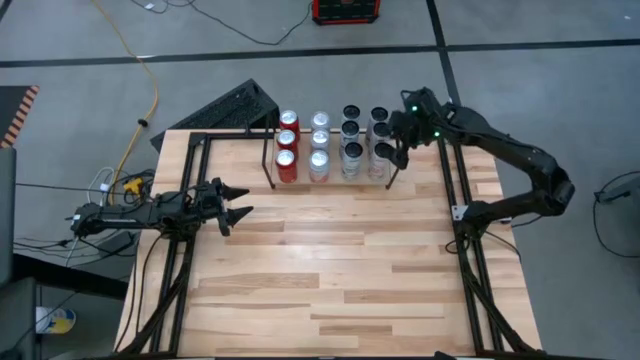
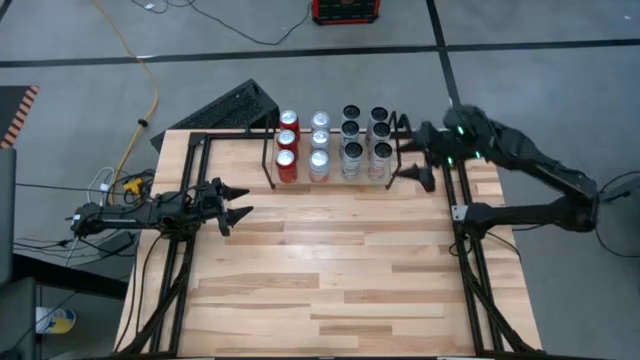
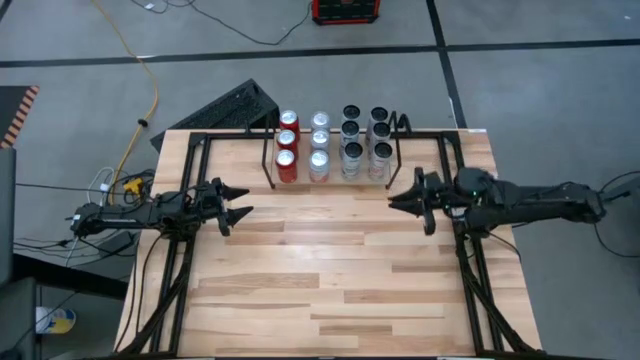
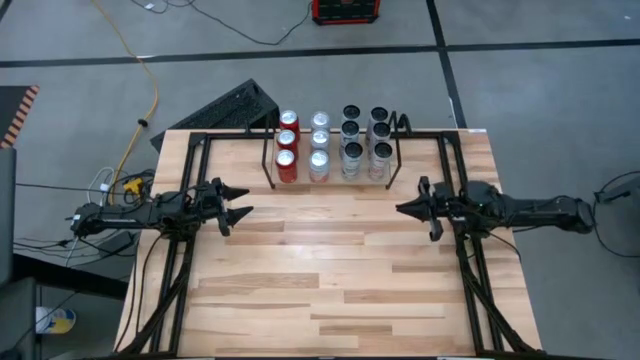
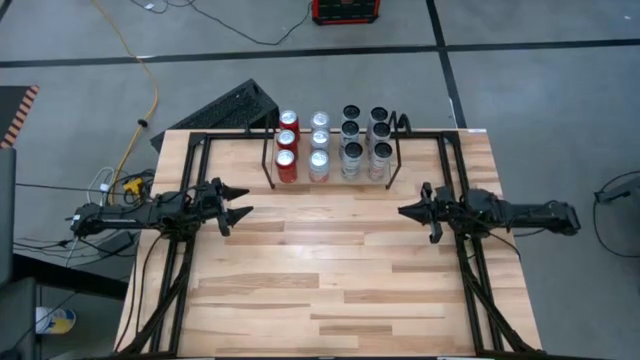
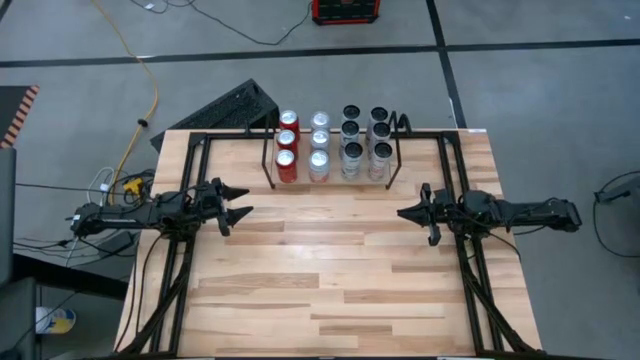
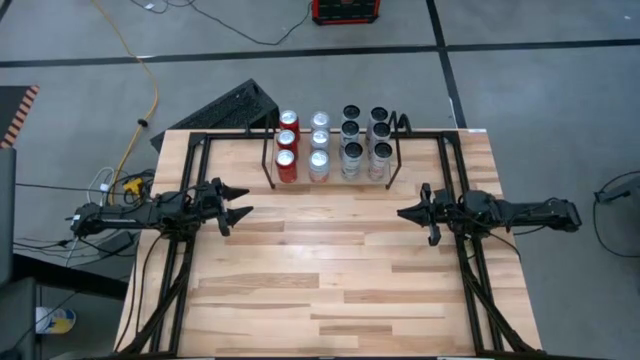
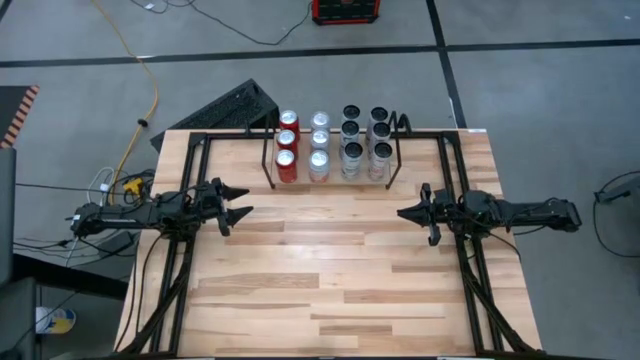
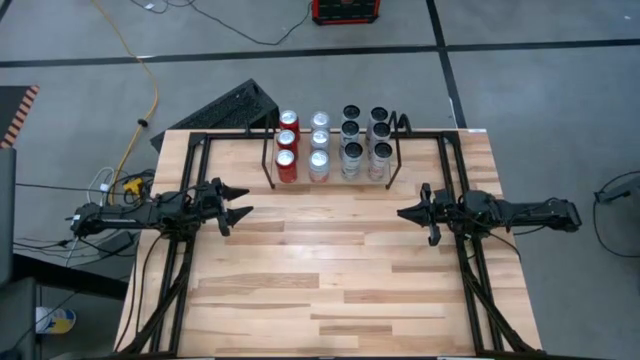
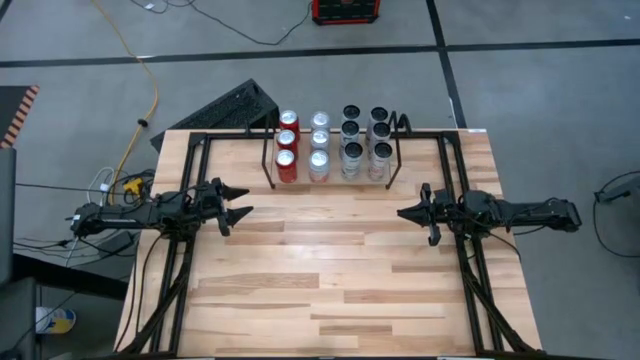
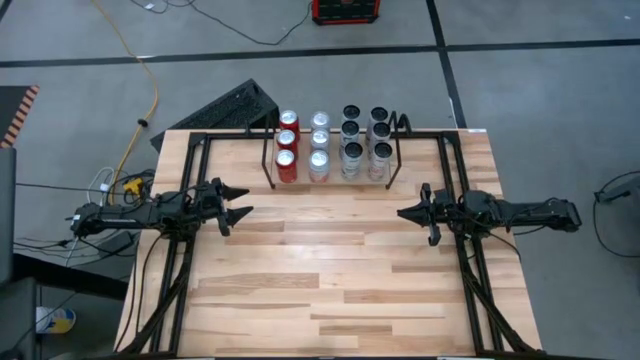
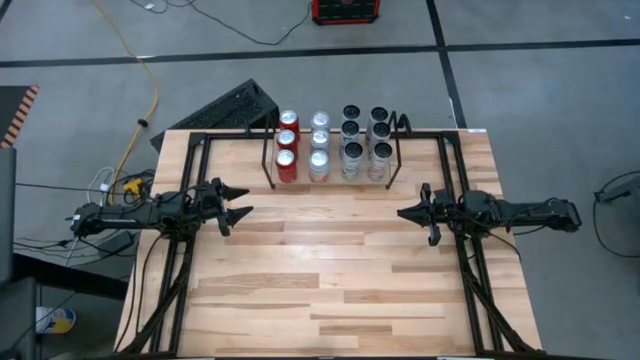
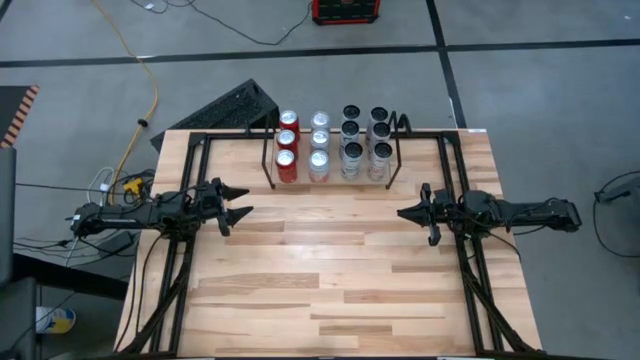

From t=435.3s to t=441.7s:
Task: Place canned beverage on shelf
Return to Home Position

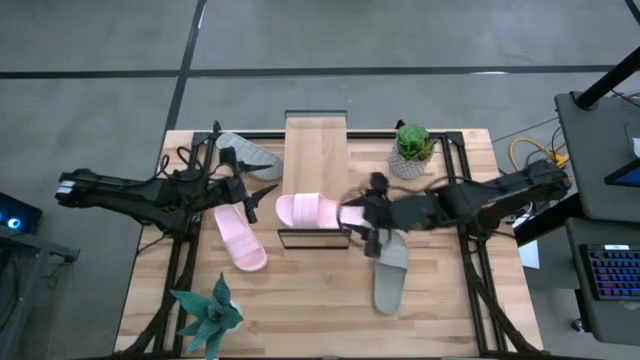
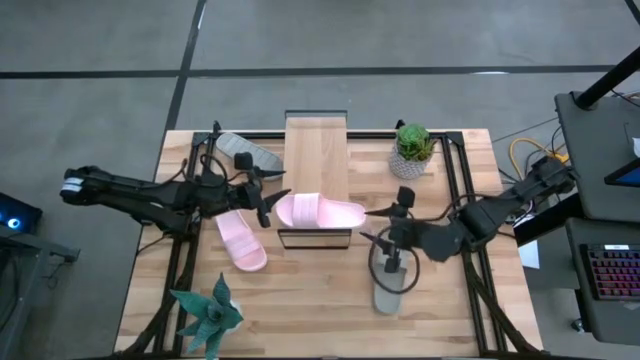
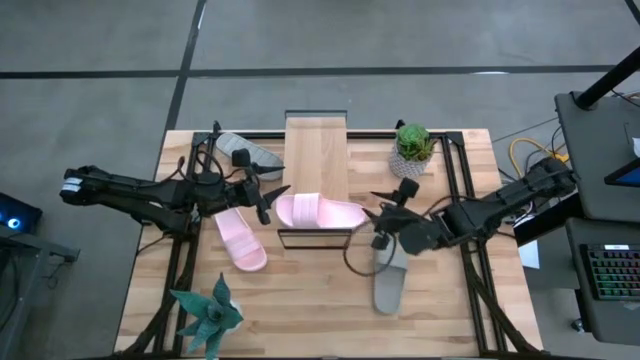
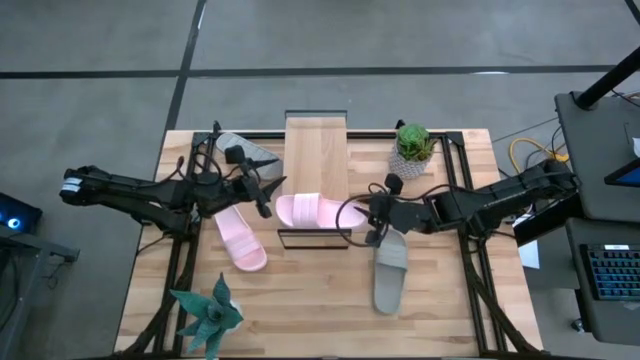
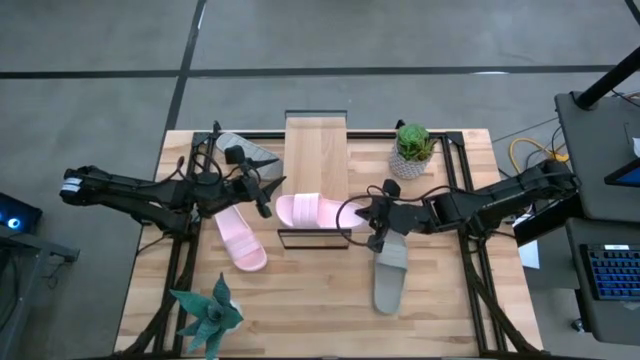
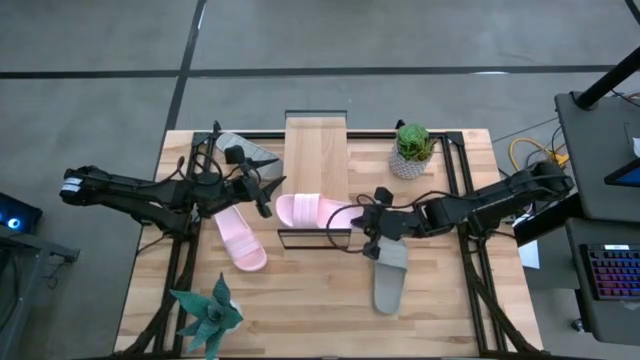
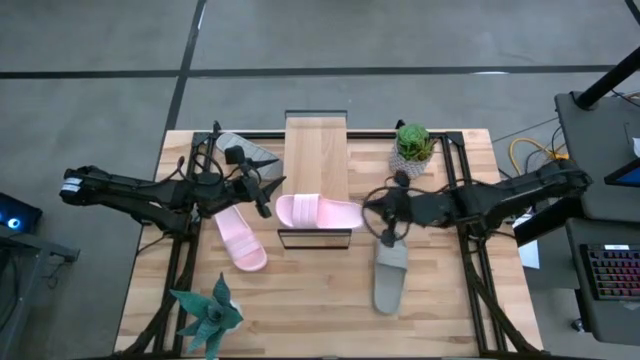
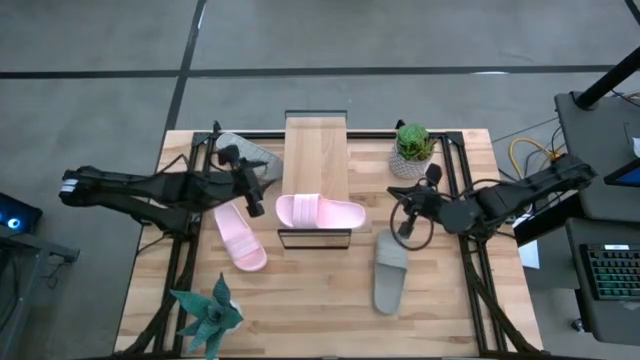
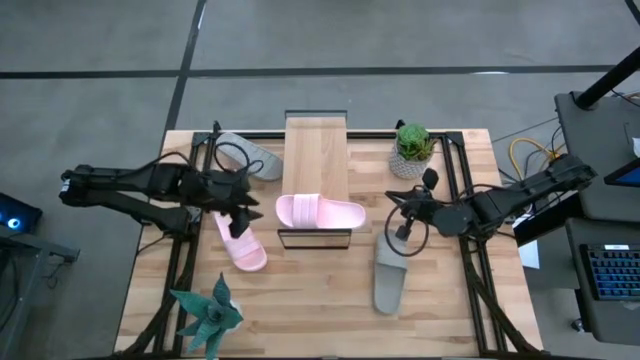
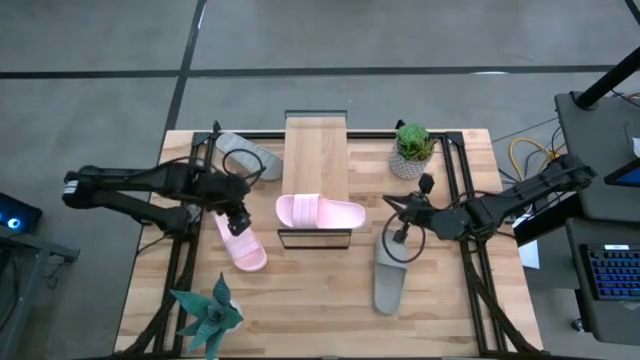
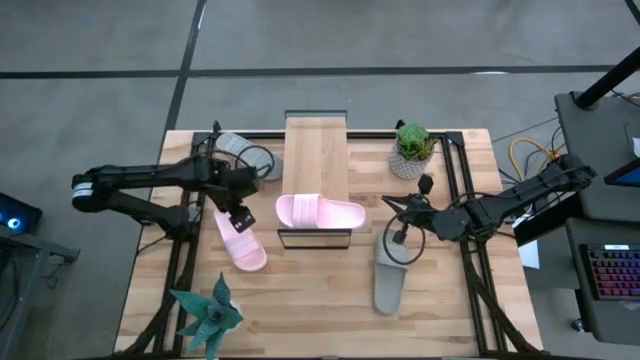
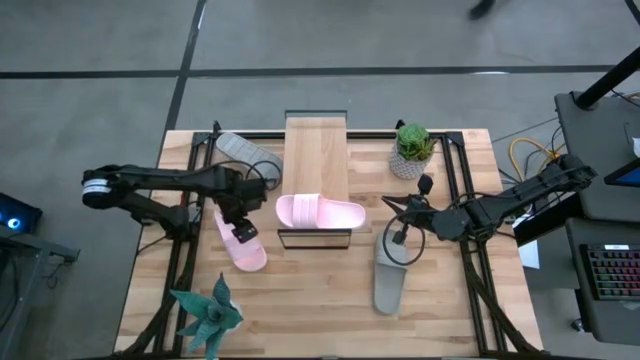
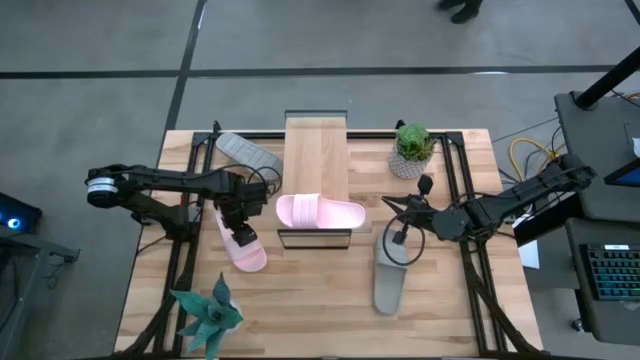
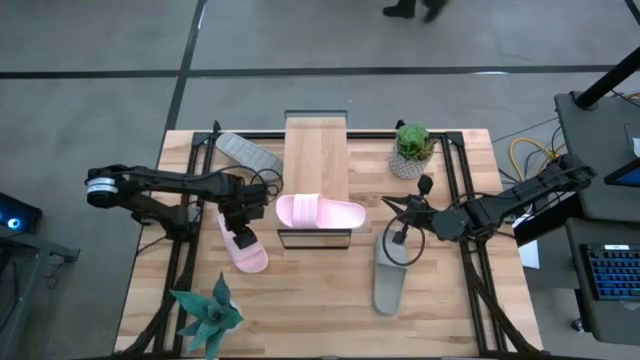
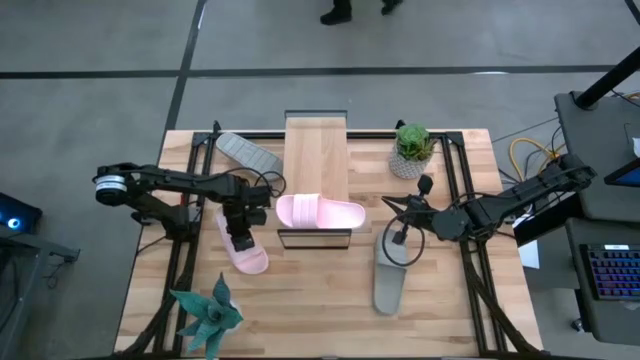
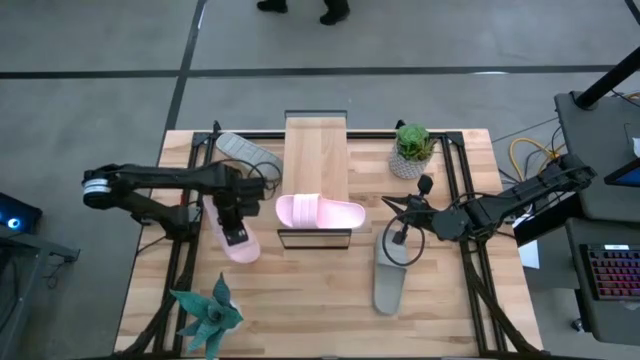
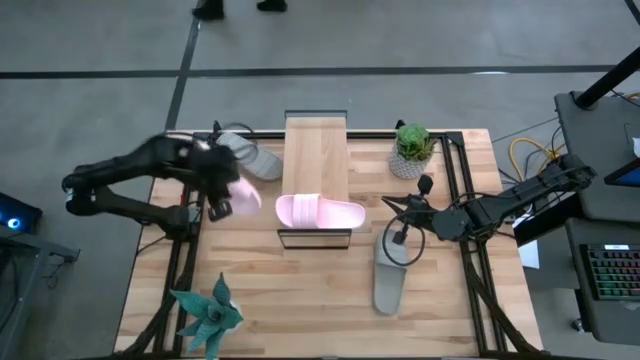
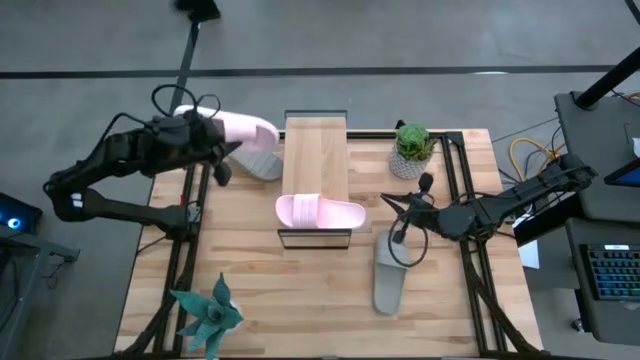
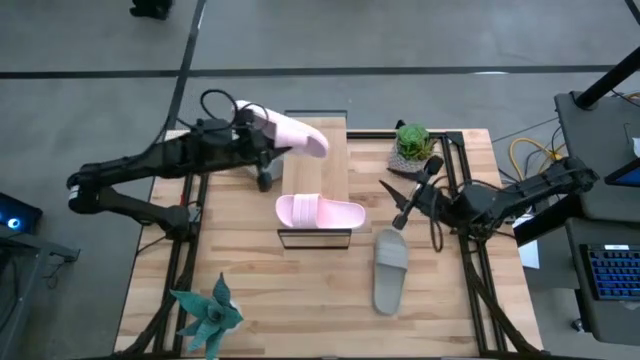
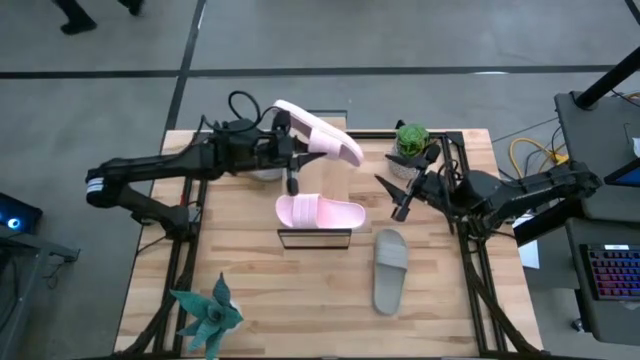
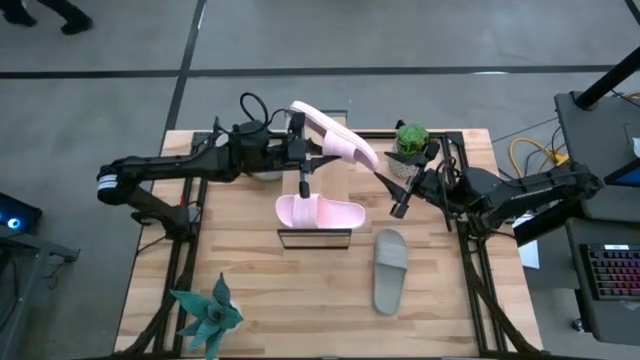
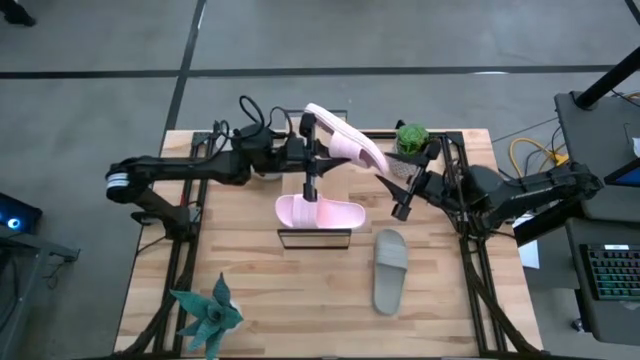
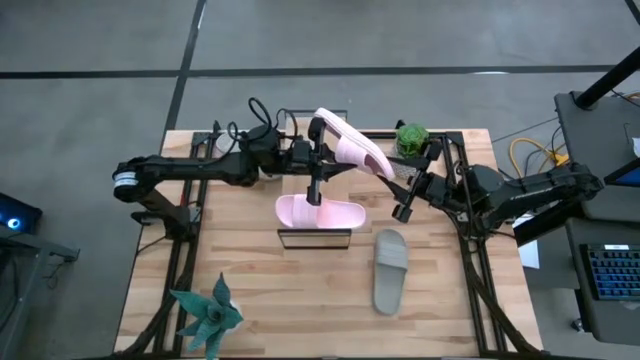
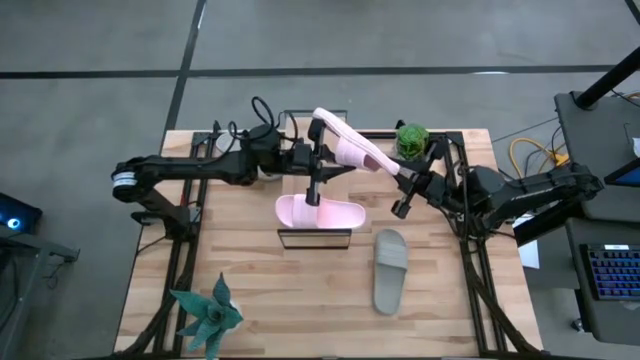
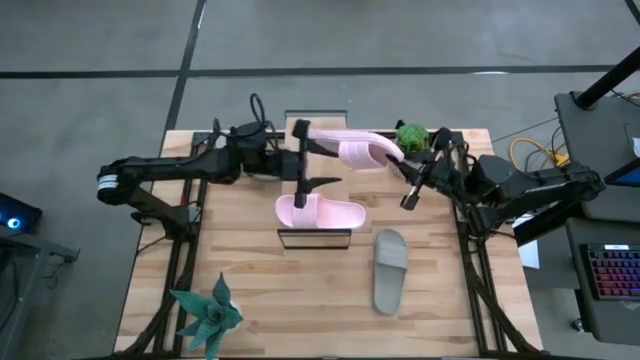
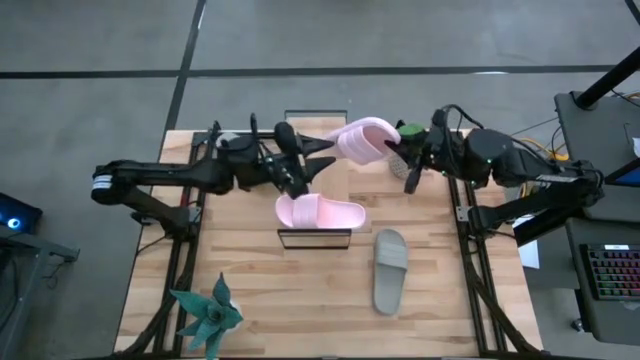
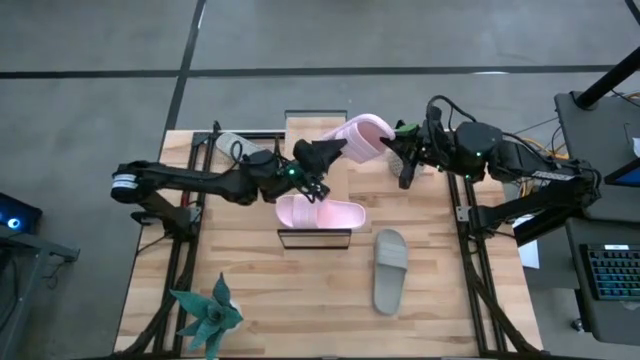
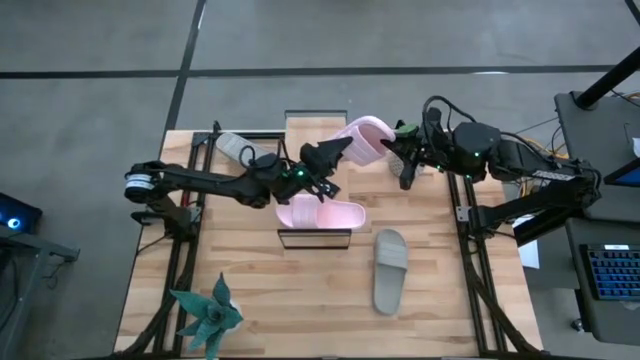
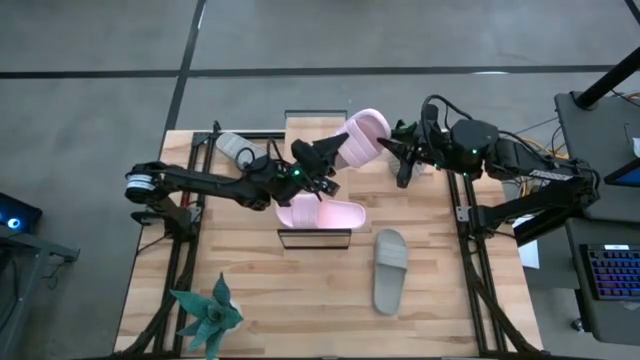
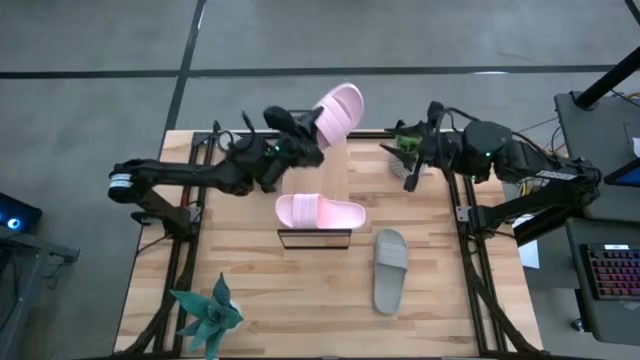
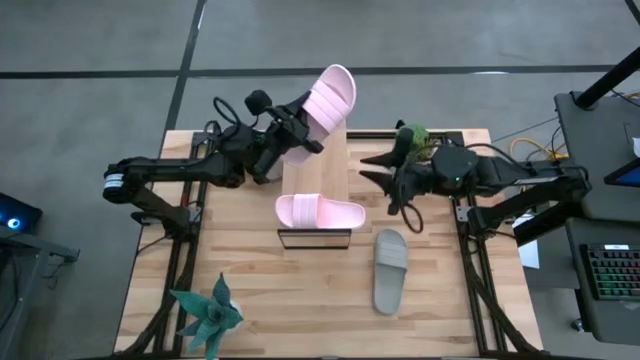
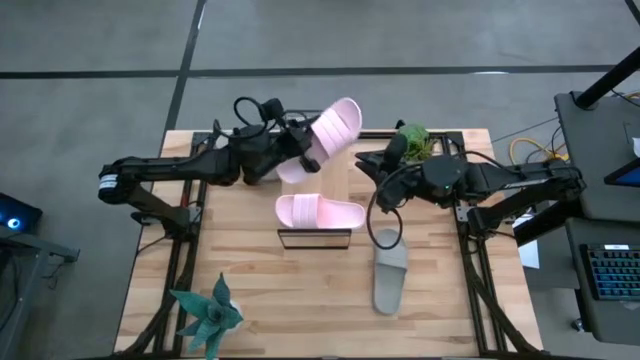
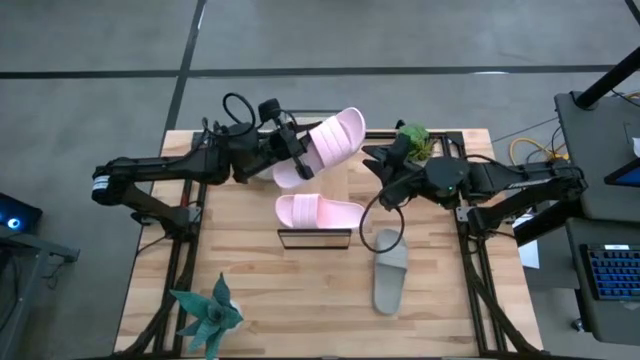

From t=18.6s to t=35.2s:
Task: Pick and place slides into the shelf
Put the pink slipper on the shelf
